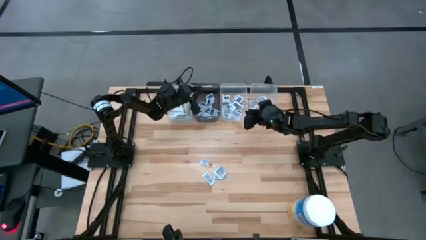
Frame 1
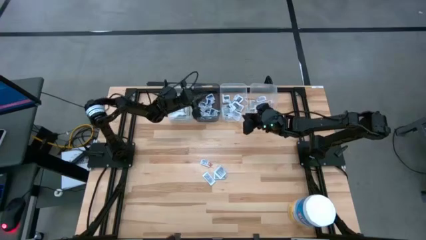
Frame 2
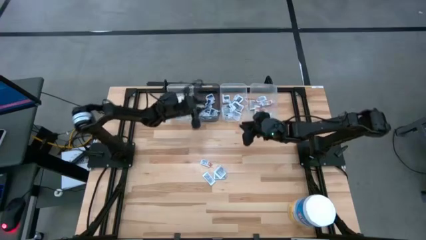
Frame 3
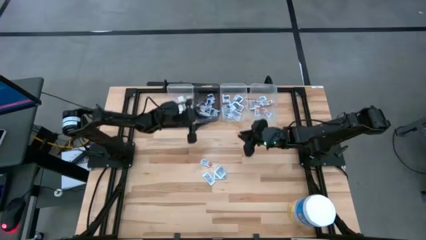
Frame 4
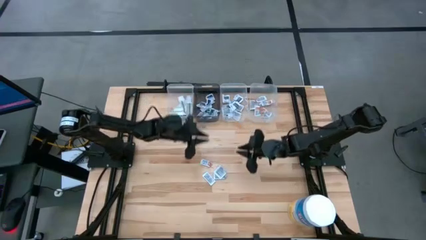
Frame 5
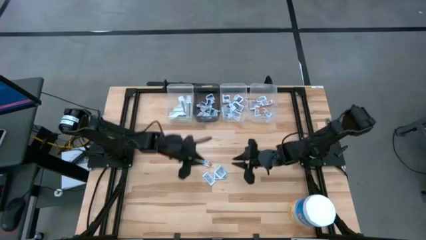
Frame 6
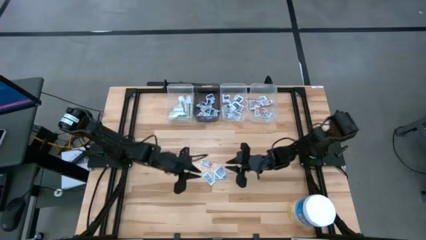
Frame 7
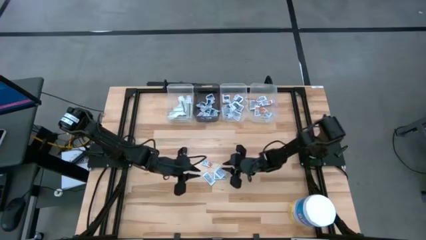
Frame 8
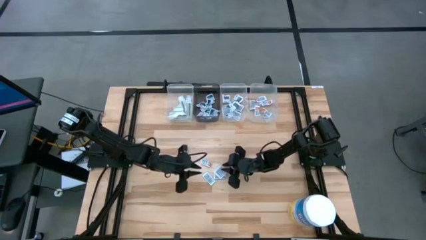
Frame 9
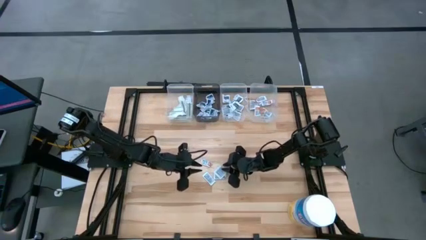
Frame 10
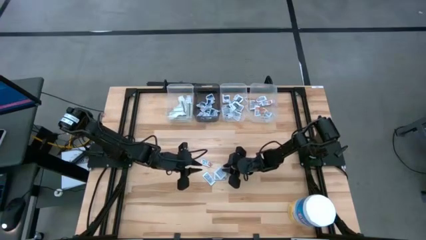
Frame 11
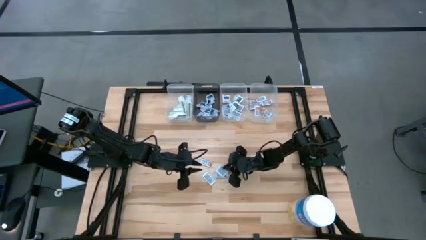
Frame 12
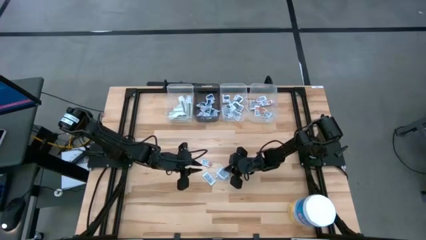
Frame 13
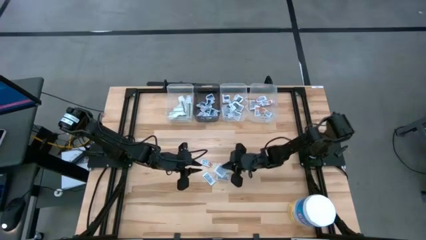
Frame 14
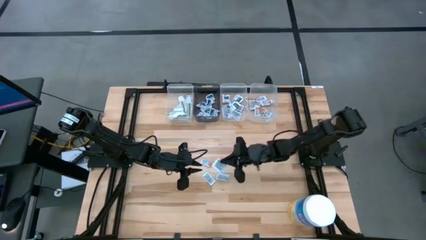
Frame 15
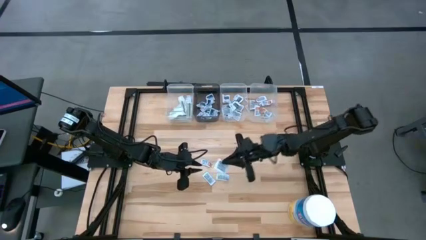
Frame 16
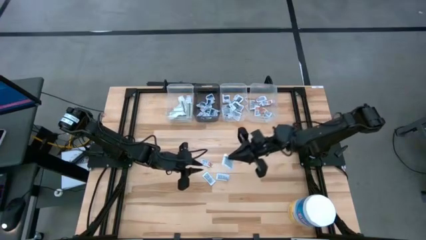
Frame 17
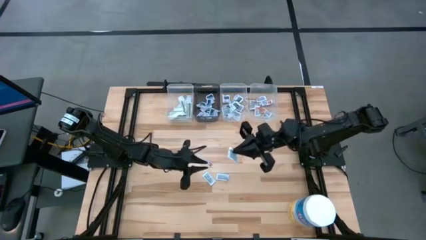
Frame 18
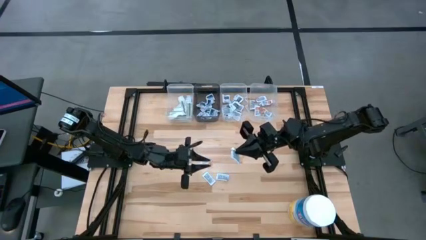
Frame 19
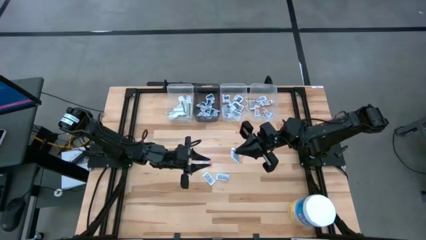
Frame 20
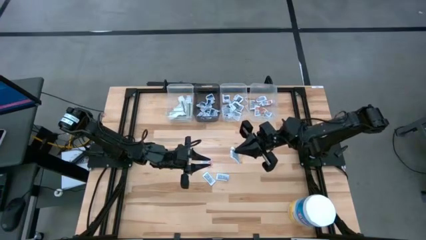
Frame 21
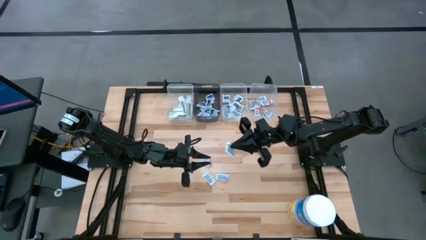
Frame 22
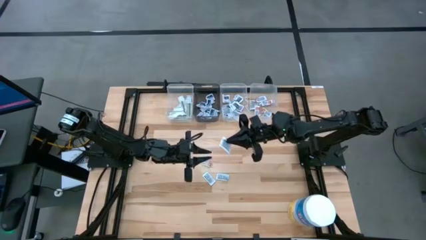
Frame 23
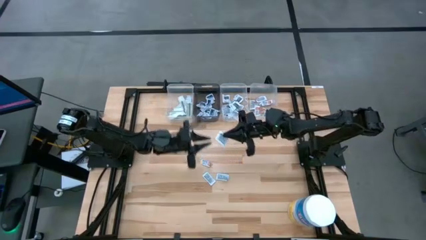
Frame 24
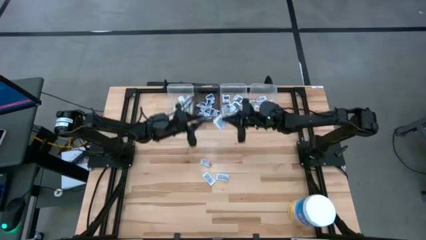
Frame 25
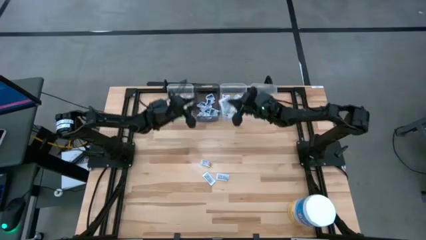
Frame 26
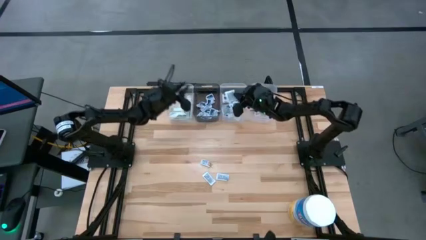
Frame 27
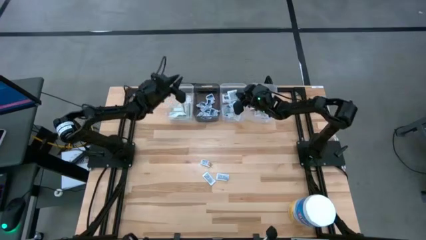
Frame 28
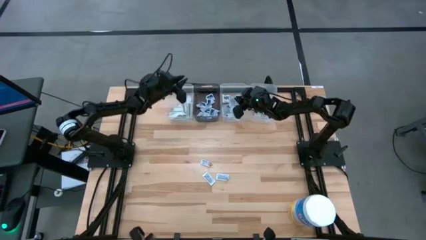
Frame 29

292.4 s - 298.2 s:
Task: Pick & Place First Aid Supplies
Put the towelette pack into the middle transparent bin

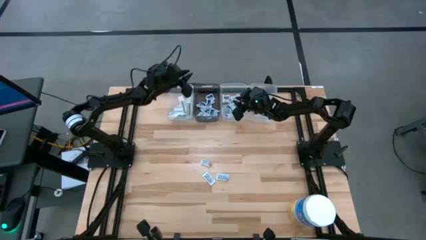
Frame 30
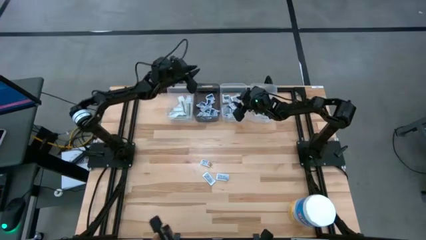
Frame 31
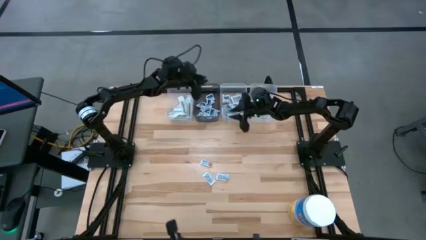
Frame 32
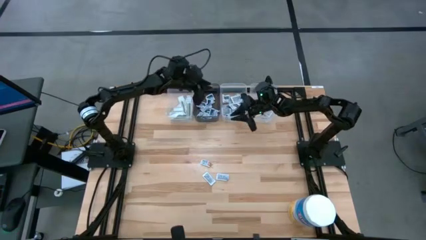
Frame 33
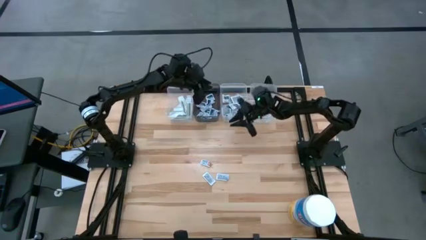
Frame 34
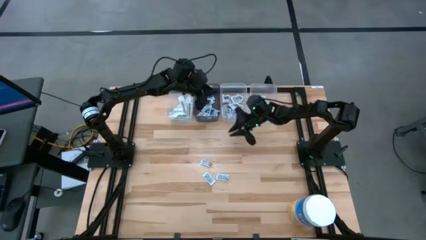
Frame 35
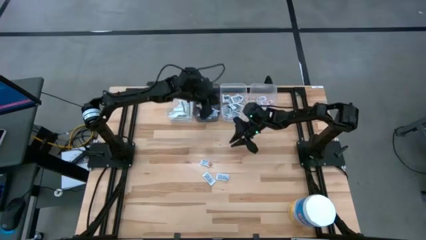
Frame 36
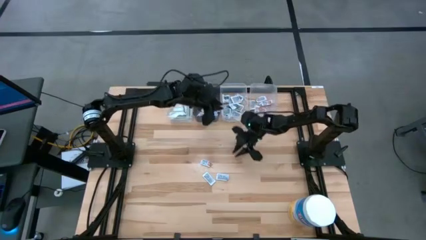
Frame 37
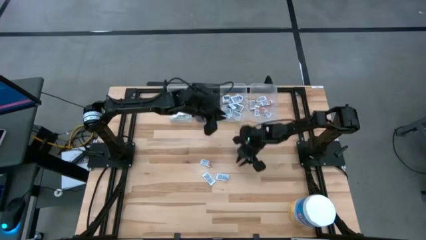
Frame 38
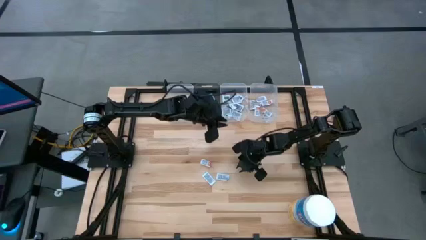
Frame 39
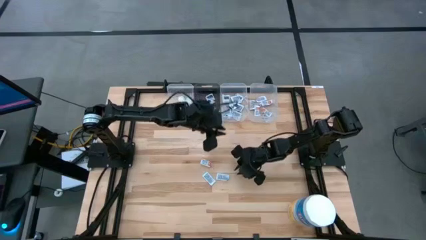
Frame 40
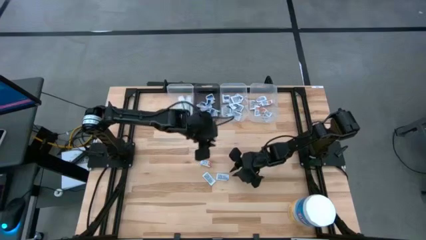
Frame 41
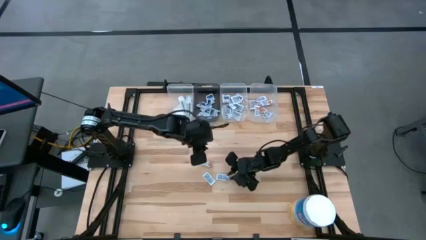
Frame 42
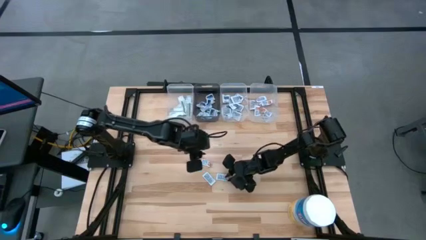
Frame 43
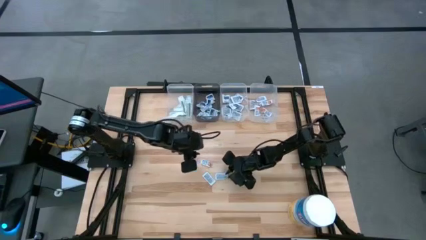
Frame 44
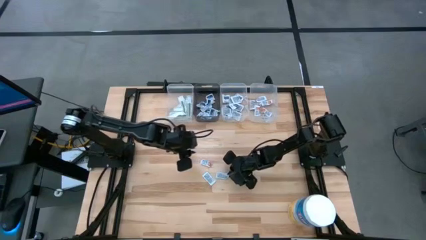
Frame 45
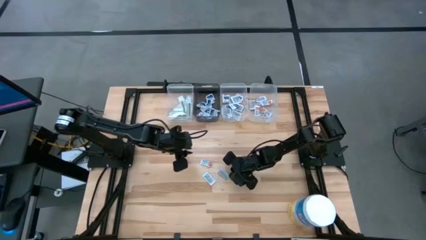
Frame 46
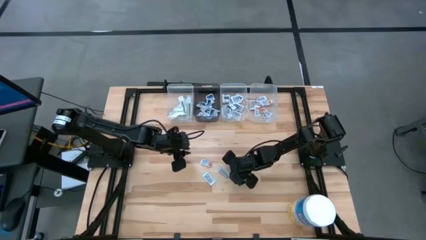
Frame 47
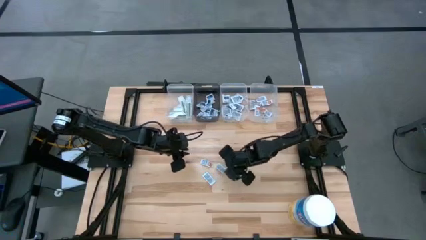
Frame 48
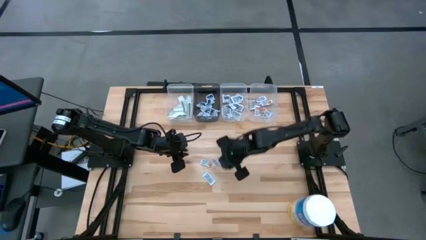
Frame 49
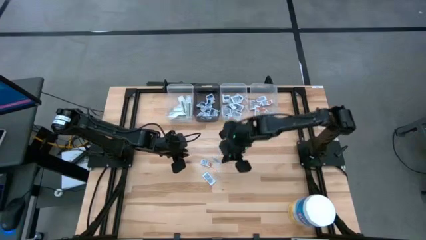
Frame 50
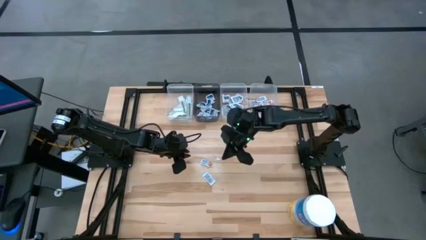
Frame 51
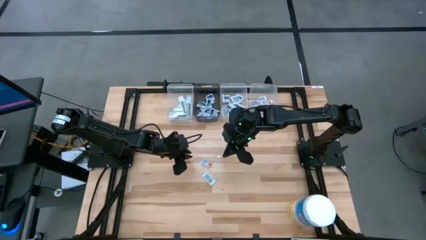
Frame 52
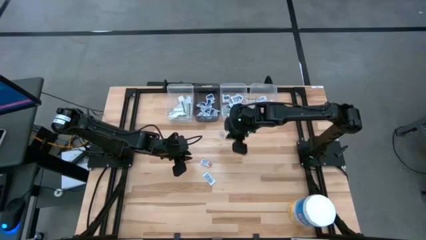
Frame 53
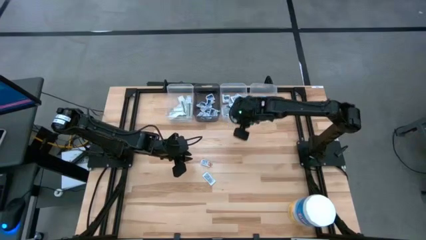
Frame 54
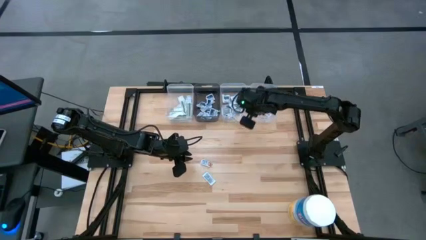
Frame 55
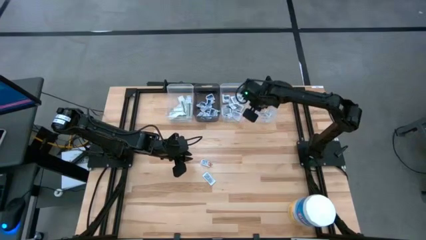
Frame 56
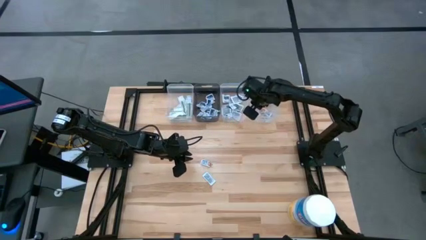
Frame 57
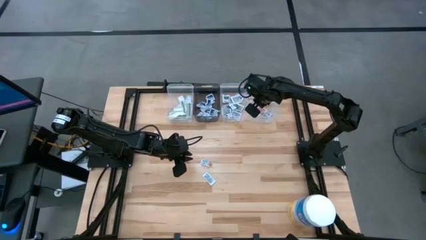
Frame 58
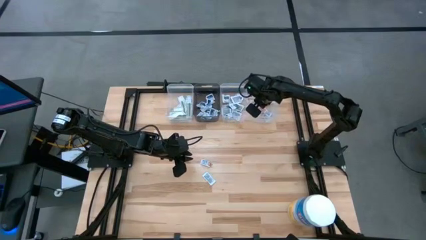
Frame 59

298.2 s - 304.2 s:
Put the ointment pack into the right transparent bin

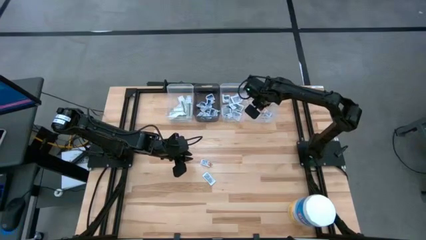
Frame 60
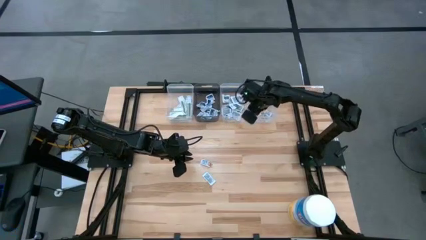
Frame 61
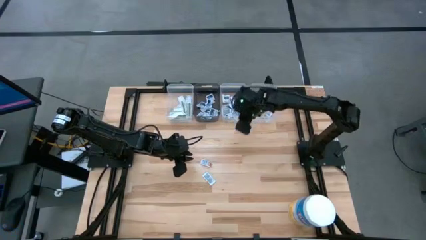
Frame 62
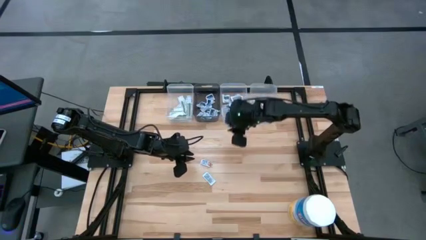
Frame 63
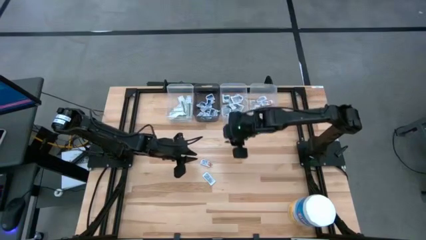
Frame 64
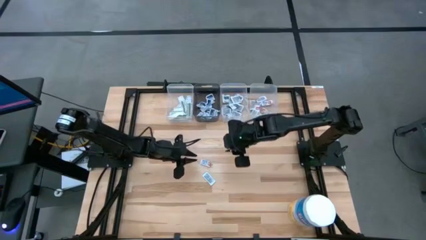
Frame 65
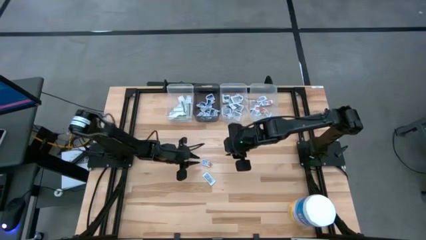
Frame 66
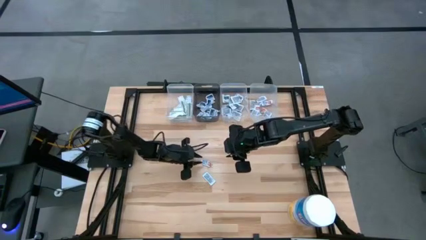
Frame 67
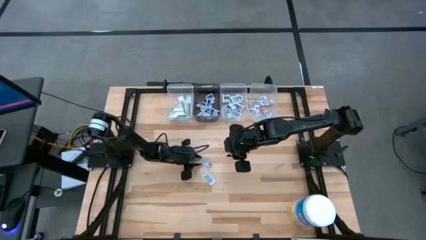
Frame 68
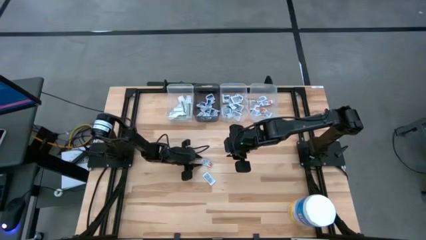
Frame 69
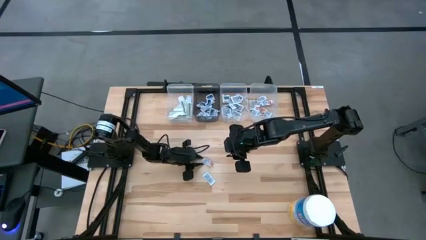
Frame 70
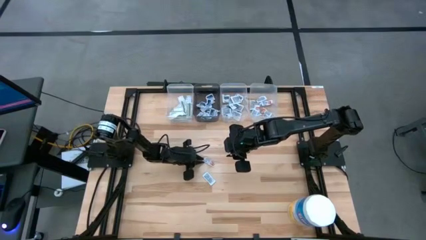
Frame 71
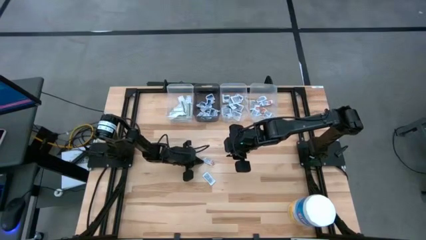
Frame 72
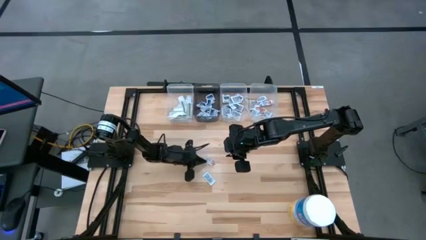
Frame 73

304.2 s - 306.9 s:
Put the ointment pack into the right transparent bin

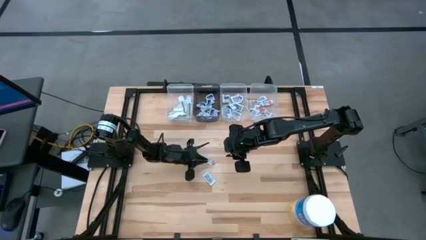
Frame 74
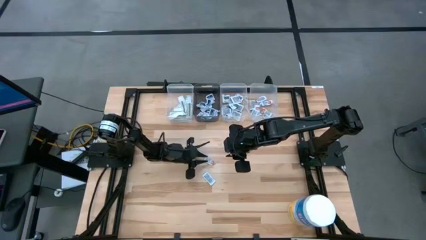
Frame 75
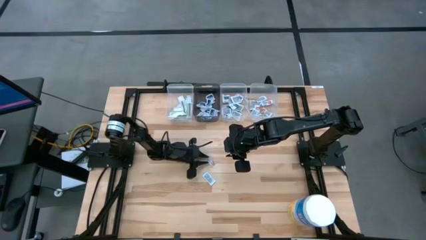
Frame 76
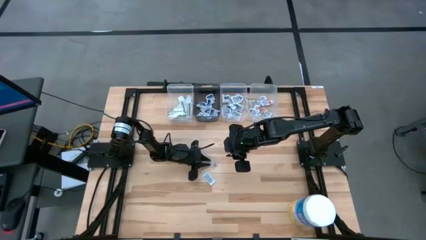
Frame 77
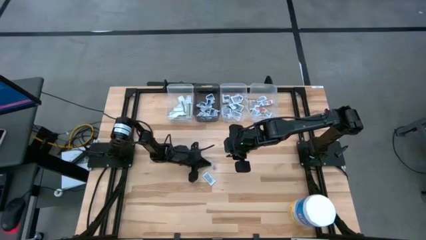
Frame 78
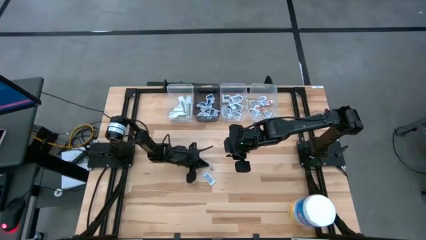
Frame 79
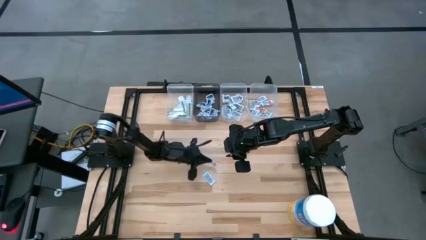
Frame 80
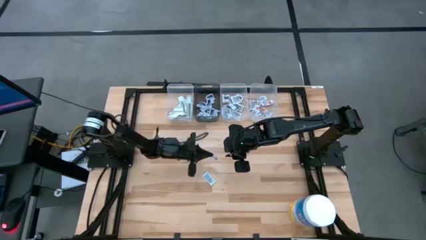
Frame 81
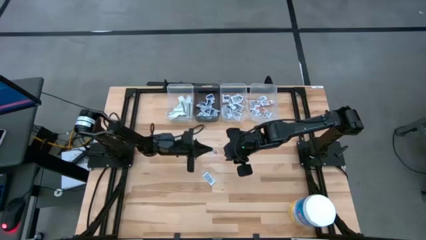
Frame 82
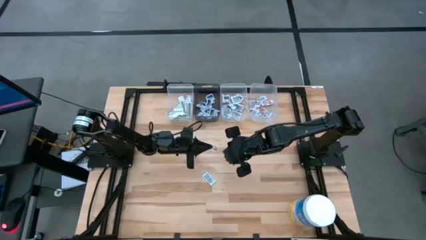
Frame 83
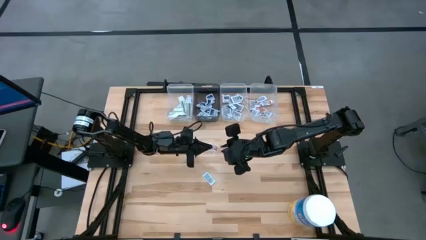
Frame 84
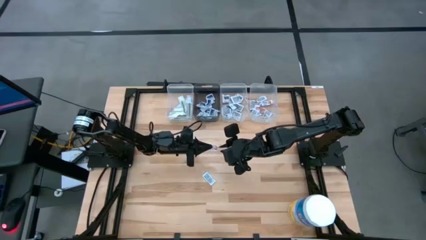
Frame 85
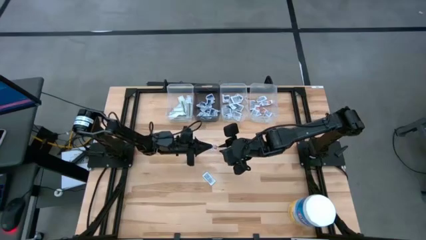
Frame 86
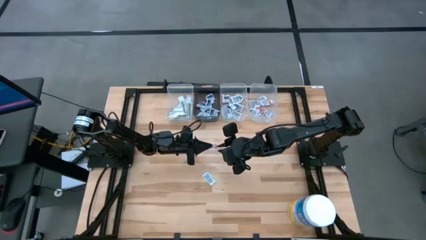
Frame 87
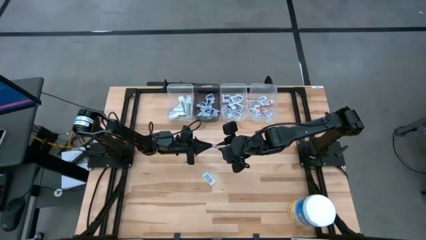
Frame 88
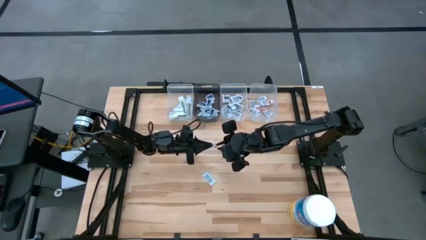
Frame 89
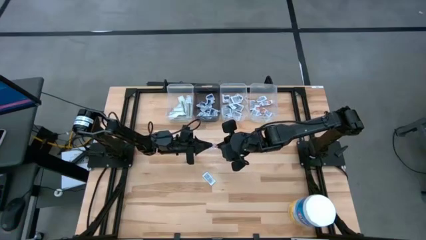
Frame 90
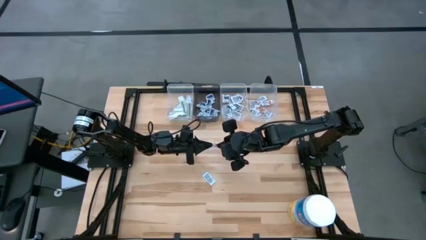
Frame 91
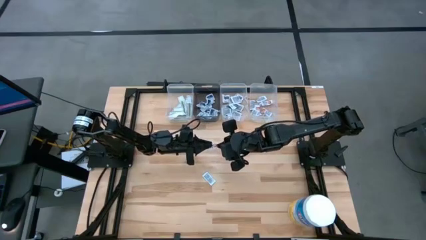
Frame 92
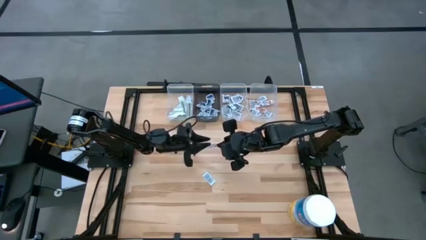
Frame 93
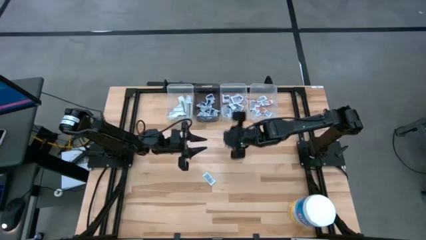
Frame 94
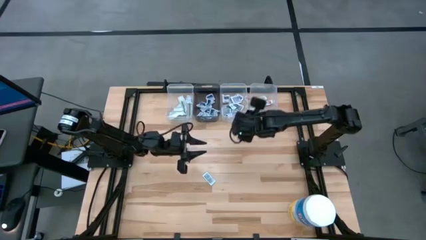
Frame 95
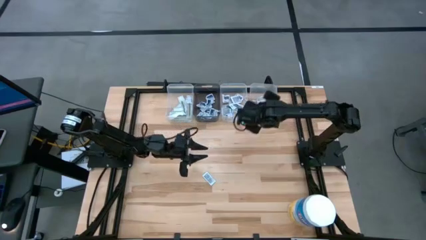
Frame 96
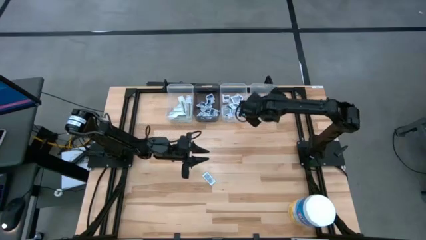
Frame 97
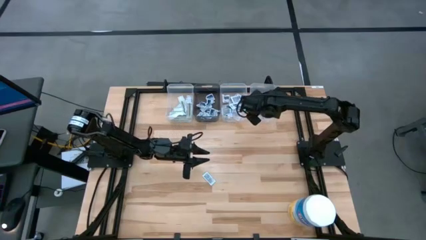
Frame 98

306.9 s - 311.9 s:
Put the ointment pack into the right transparent bin
